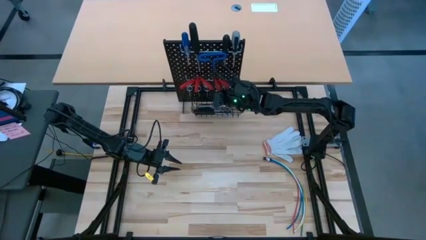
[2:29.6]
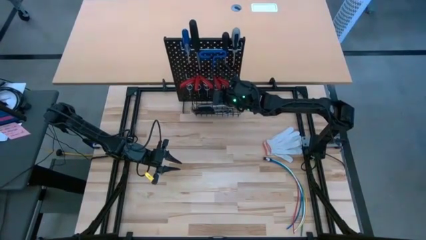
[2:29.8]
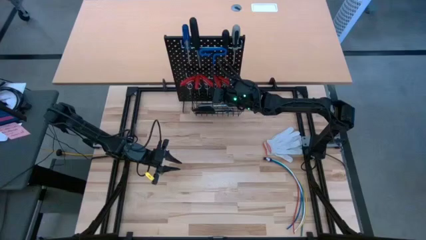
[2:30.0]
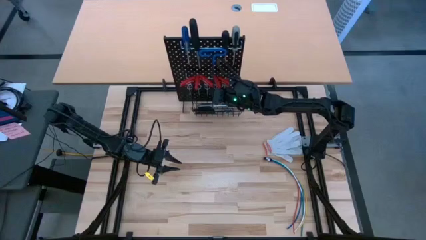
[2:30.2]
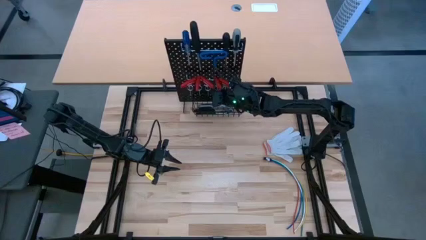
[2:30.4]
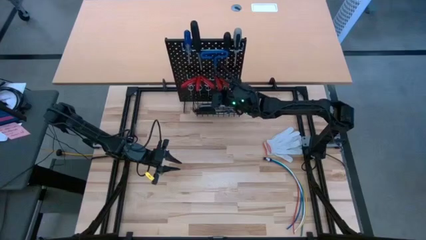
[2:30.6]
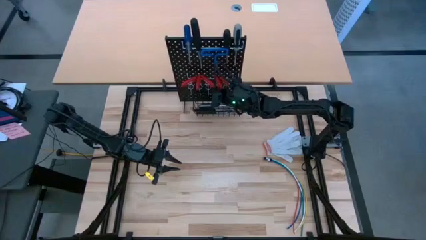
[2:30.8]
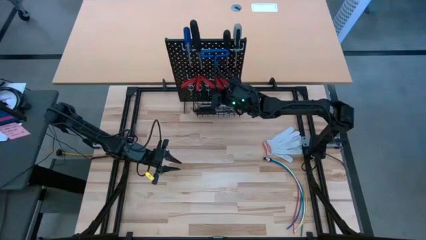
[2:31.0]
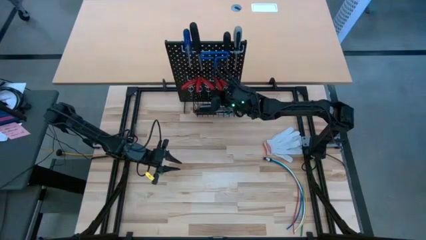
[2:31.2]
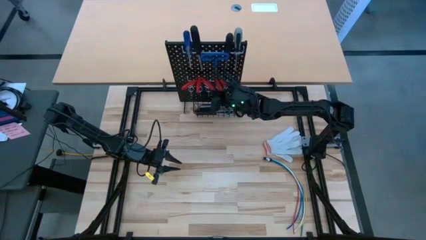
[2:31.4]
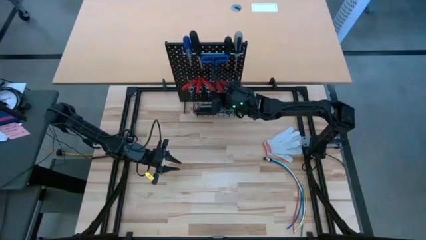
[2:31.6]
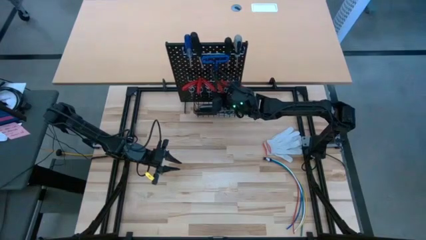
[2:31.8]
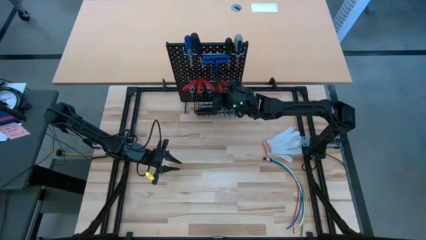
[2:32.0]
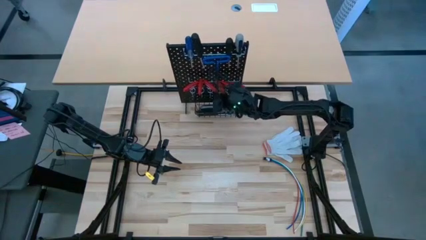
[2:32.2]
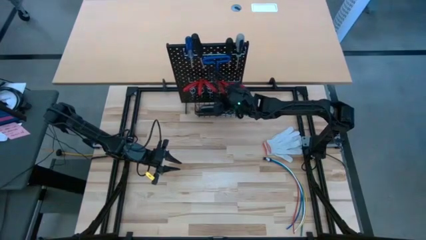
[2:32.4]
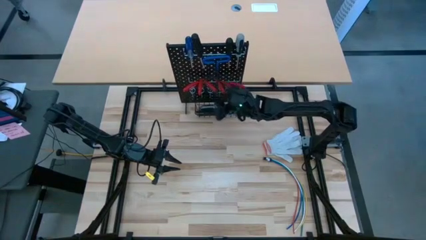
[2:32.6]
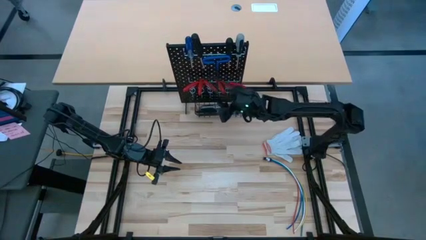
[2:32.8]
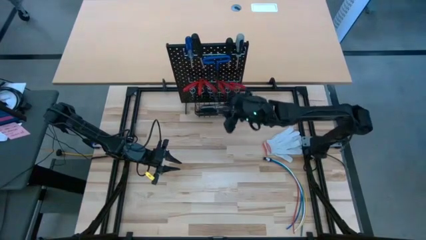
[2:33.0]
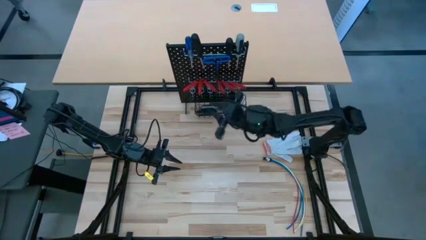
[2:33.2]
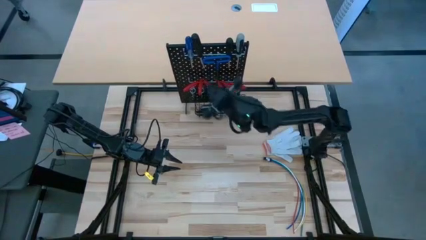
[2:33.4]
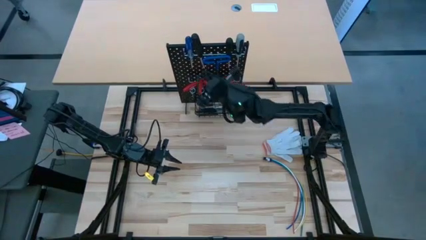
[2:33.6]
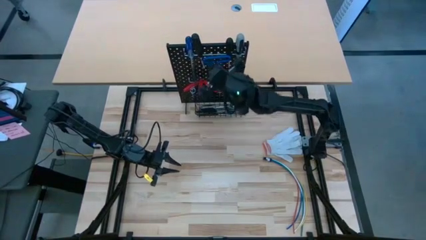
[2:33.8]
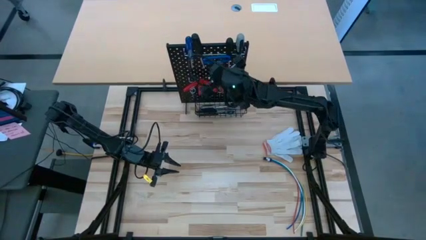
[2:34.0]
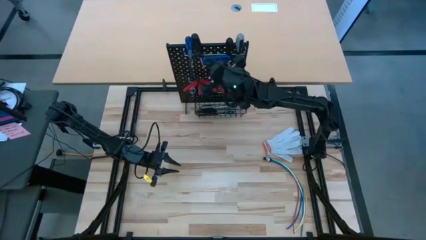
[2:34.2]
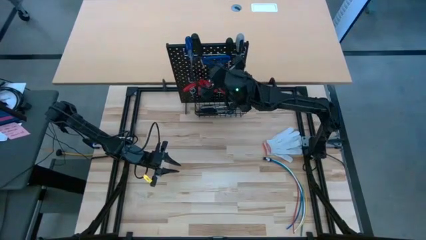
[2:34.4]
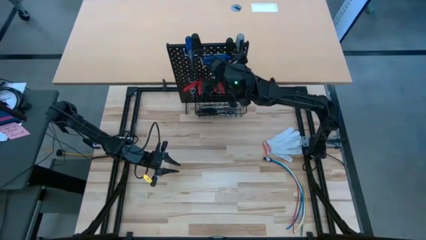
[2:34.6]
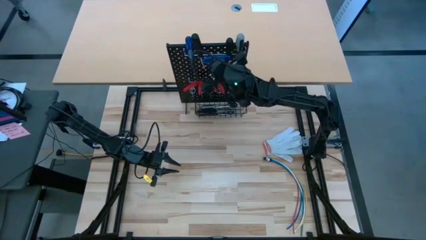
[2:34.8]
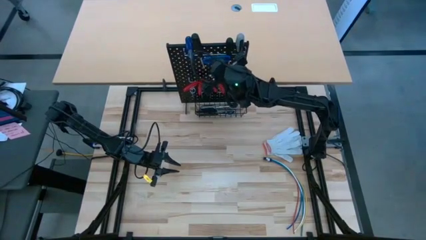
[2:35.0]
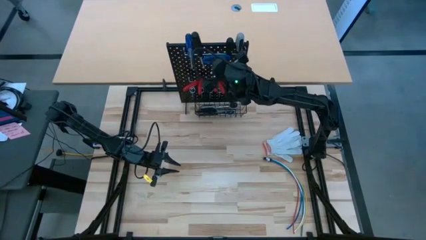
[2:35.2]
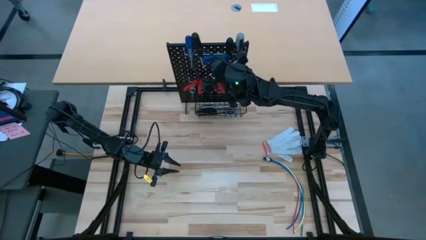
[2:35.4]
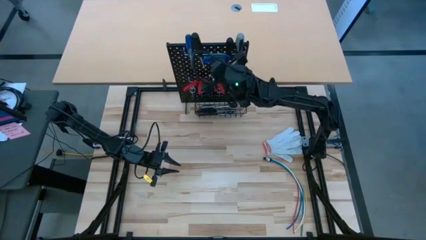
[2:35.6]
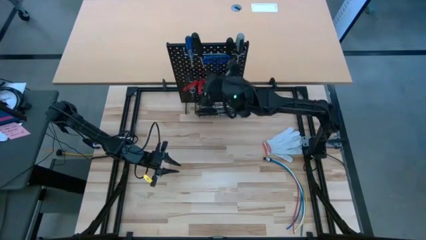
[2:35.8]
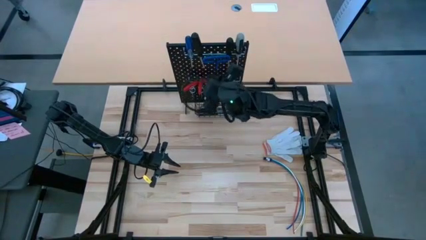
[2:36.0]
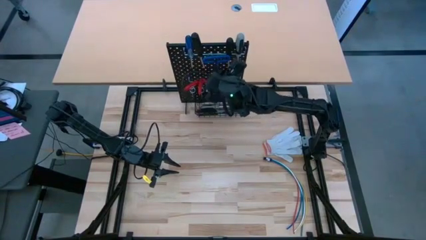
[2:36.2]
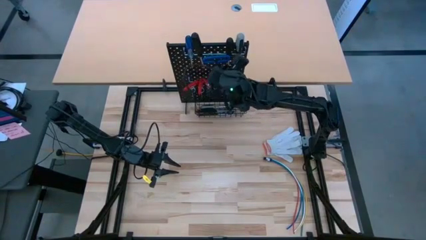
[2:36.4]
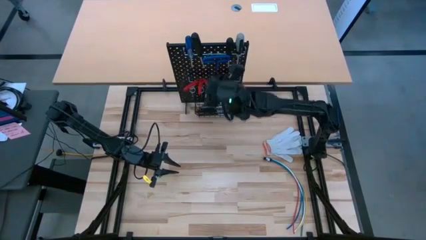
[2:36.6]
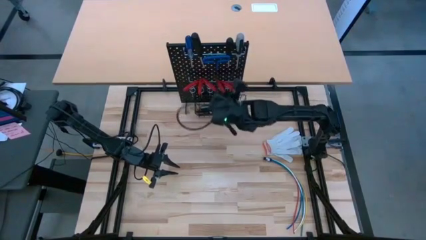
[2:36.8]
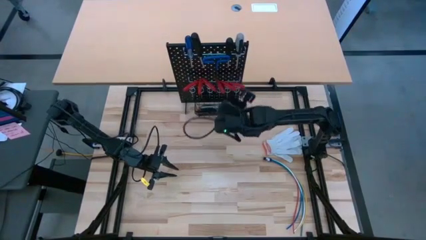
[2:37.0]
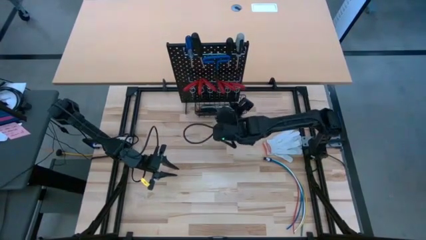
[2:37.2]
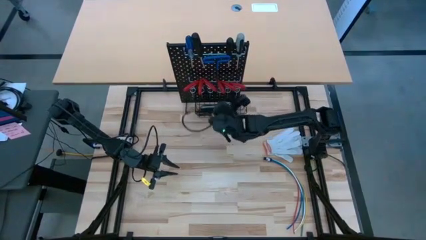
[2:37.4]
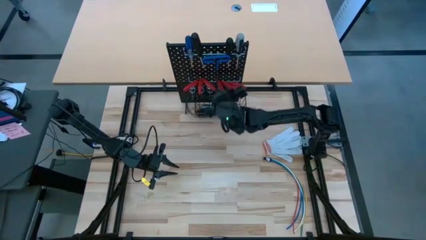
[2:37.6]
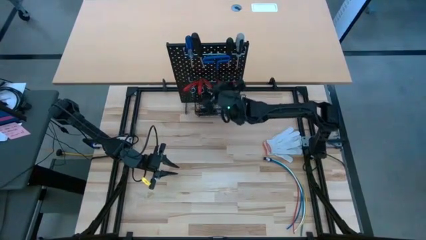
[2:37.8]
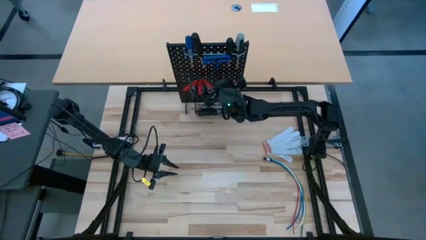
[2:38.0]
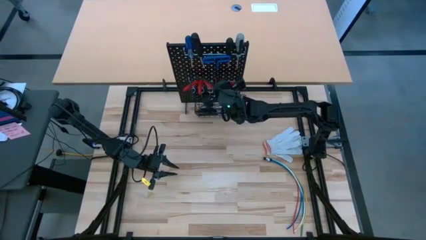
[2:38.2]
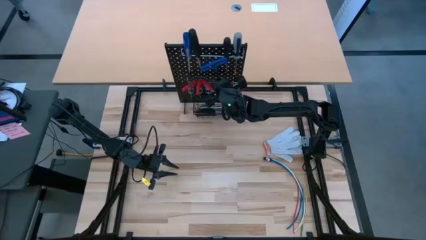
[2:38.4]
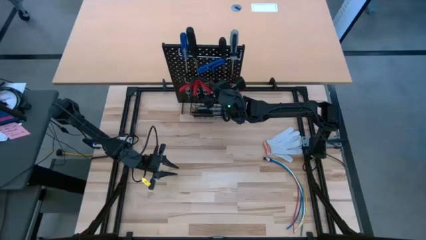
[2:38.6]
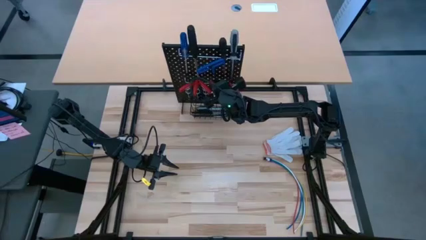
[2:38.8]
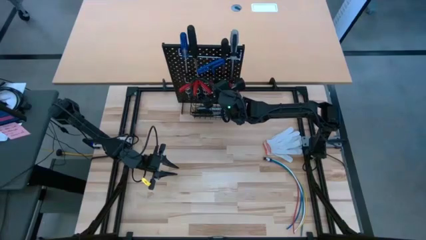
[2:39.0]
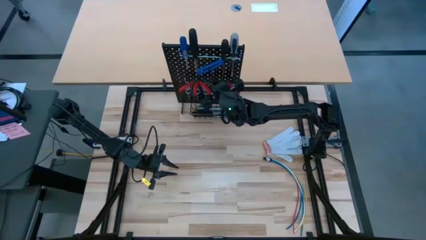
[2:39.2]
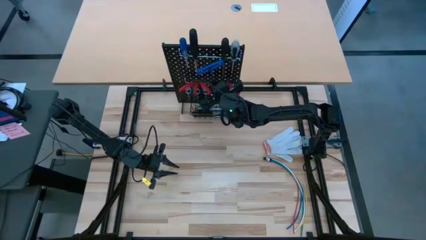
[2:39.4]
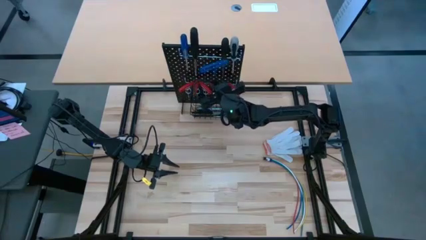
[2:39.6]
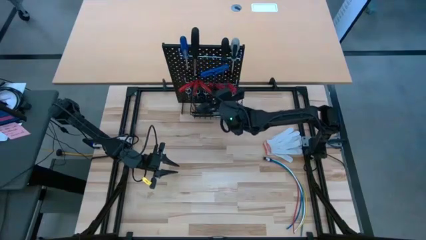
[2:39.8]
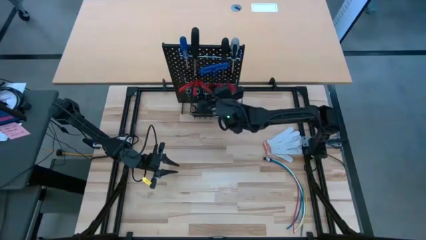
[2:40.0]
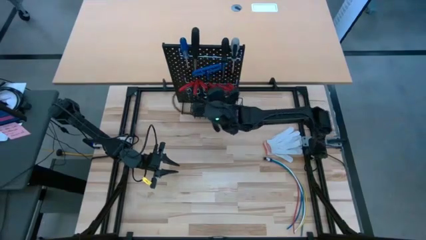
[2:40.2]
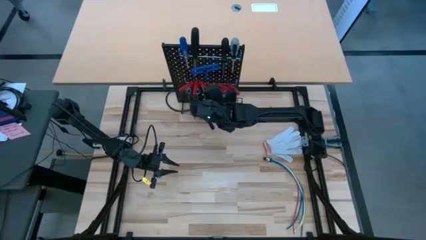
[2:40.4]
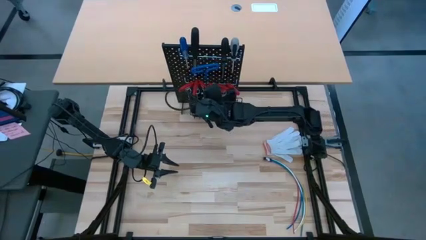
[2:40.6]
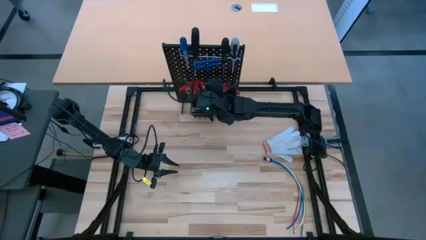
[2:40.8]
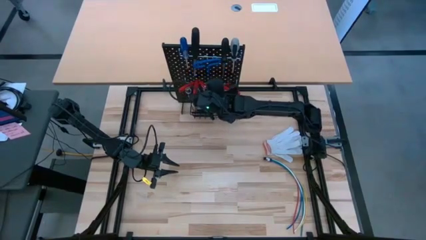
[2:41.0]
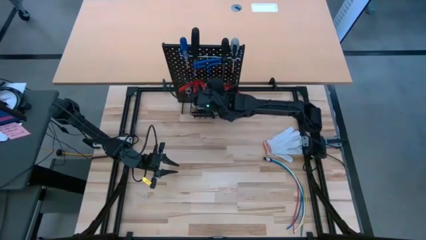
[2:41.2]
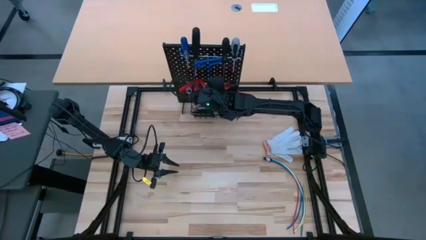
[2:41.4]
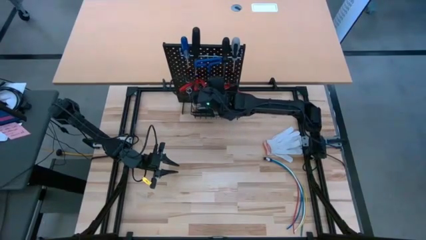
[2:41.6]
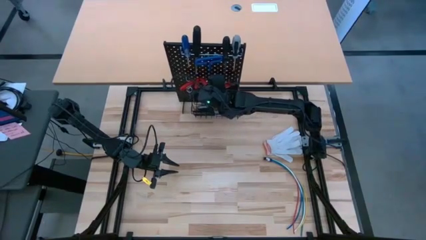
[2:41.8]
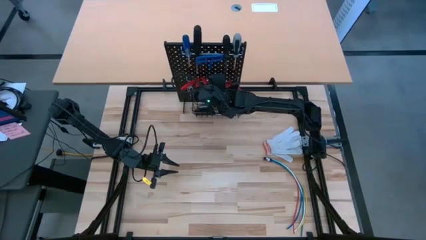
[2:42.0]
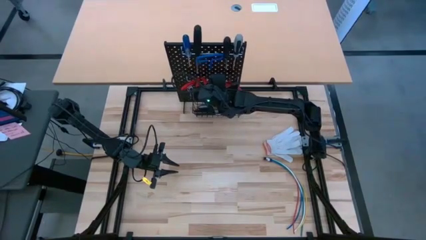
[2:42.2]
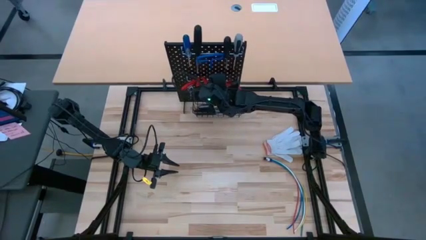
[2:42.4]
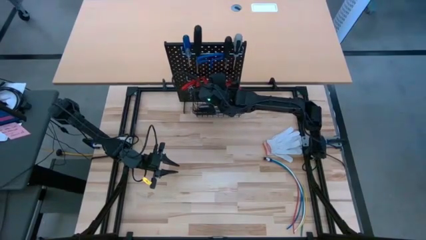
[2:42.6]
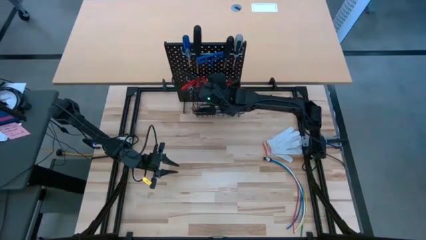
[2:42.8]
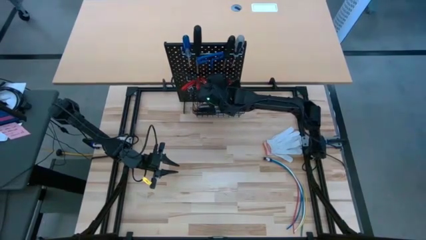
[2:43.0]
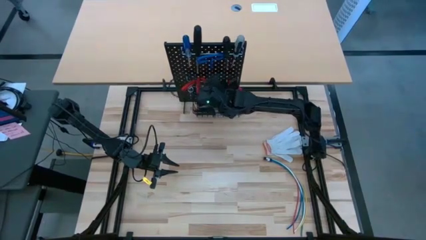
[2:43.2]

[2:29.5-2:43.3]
Task: Hang tools onto peg board
Hang the blue pick tool on the pegboard
